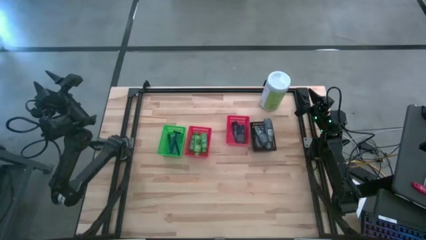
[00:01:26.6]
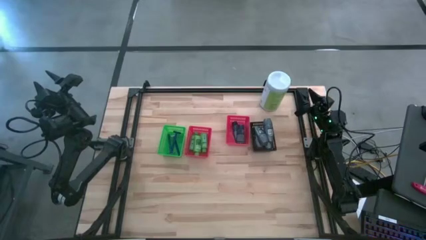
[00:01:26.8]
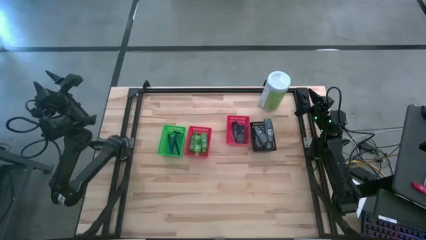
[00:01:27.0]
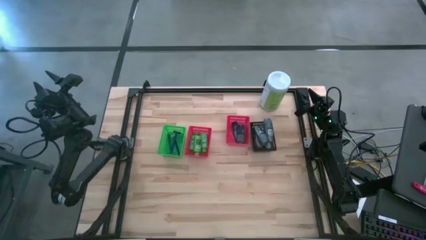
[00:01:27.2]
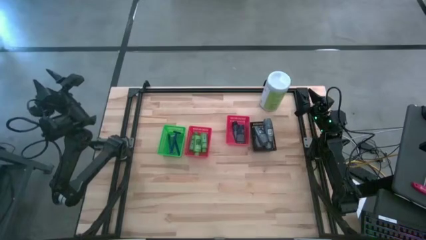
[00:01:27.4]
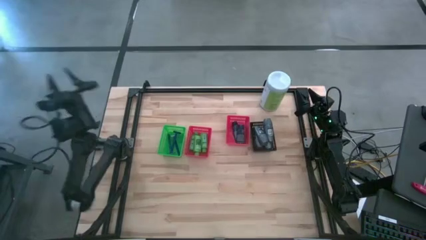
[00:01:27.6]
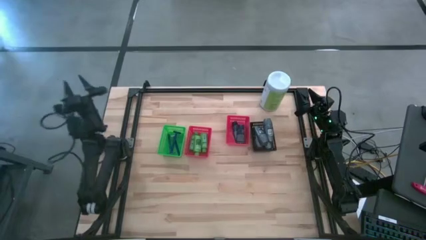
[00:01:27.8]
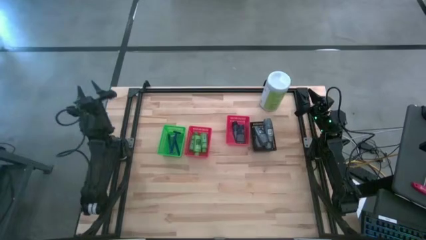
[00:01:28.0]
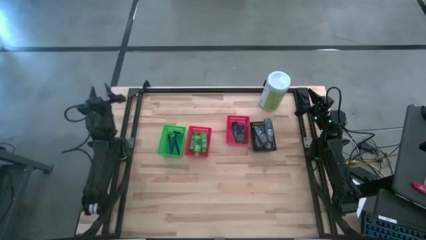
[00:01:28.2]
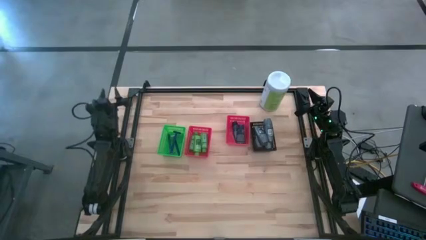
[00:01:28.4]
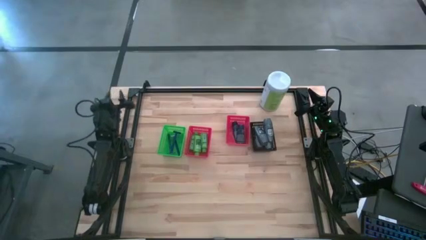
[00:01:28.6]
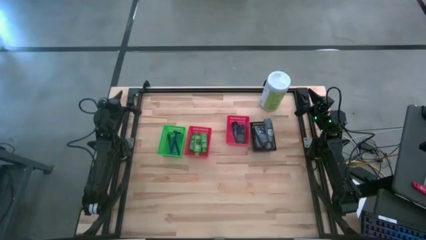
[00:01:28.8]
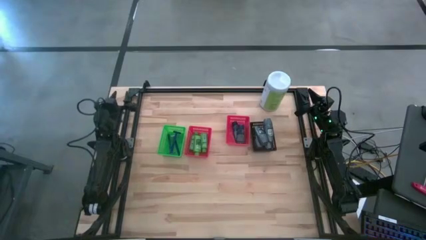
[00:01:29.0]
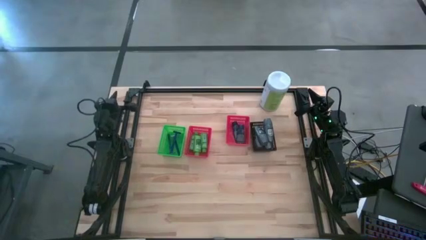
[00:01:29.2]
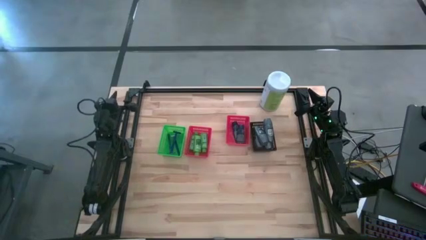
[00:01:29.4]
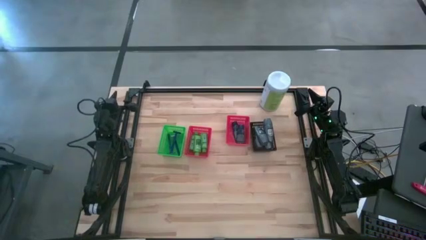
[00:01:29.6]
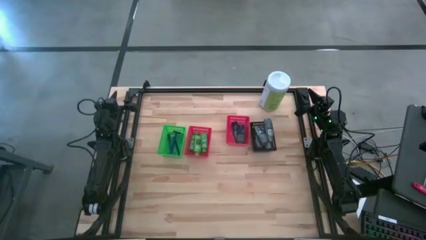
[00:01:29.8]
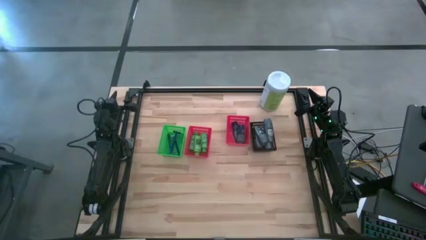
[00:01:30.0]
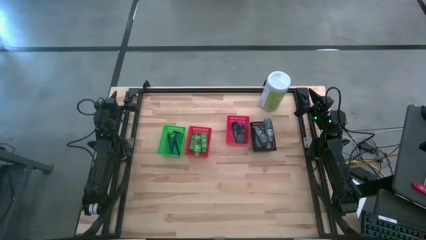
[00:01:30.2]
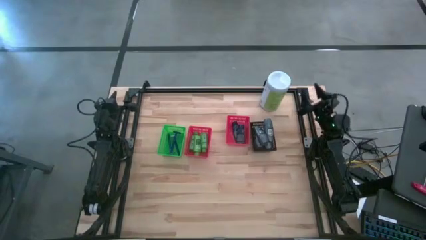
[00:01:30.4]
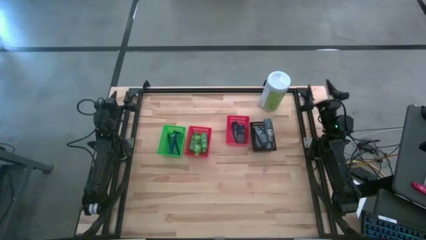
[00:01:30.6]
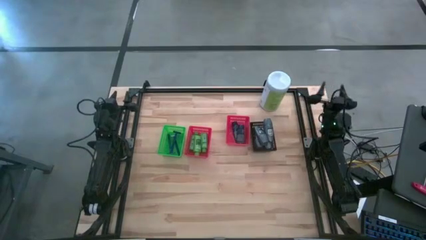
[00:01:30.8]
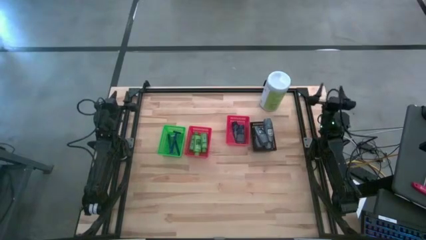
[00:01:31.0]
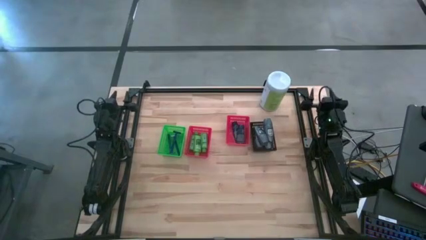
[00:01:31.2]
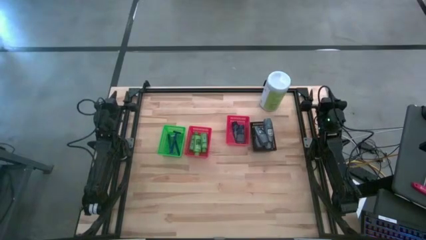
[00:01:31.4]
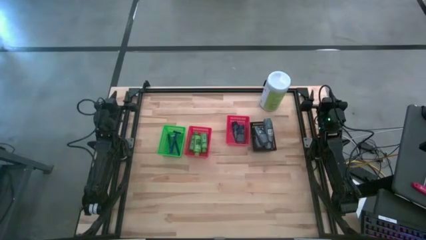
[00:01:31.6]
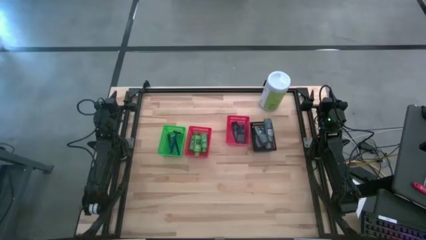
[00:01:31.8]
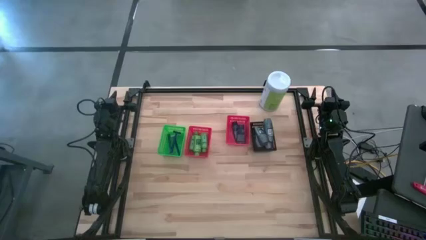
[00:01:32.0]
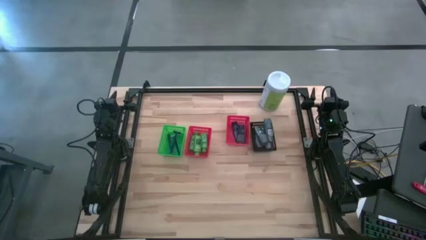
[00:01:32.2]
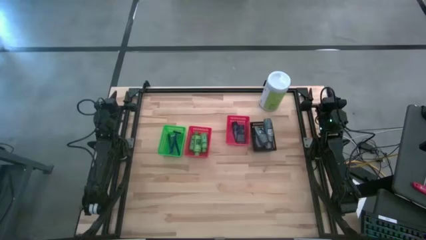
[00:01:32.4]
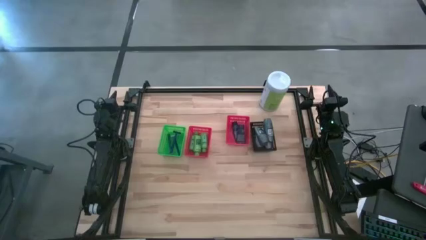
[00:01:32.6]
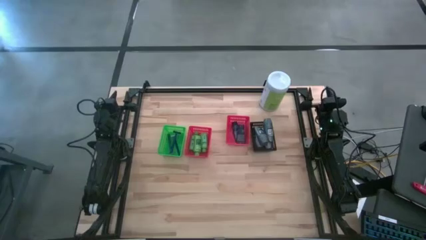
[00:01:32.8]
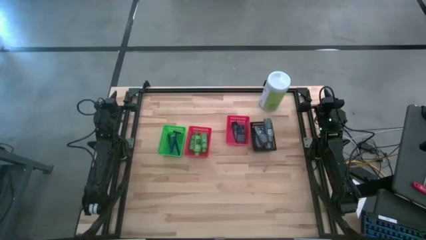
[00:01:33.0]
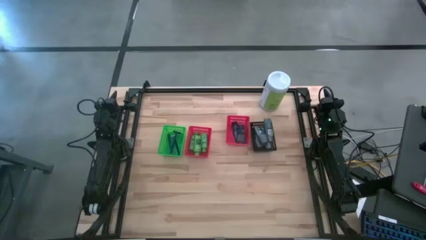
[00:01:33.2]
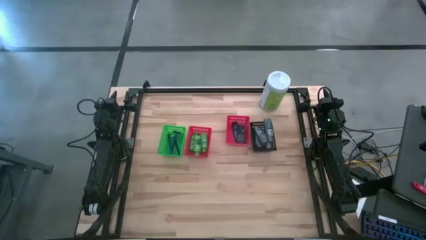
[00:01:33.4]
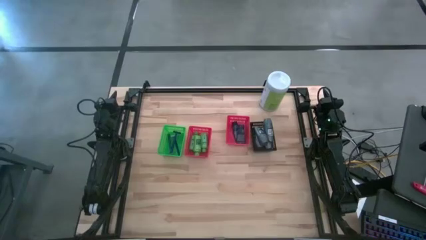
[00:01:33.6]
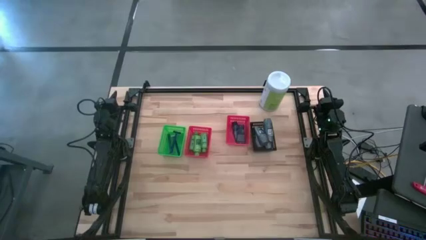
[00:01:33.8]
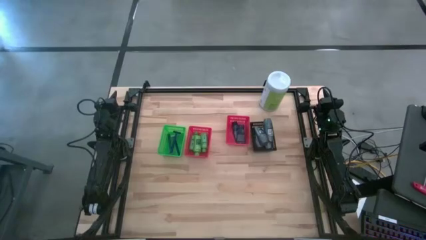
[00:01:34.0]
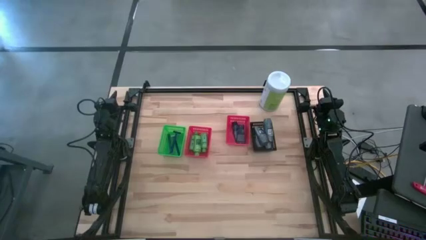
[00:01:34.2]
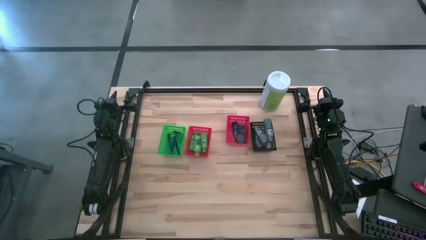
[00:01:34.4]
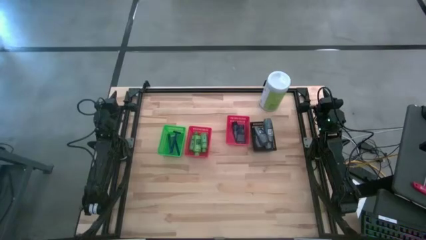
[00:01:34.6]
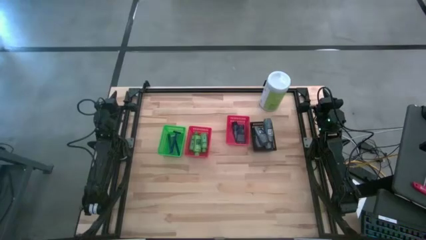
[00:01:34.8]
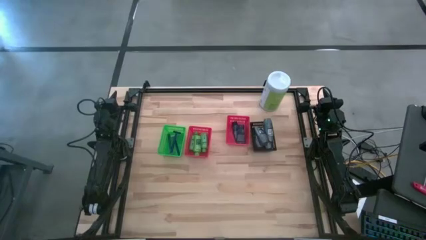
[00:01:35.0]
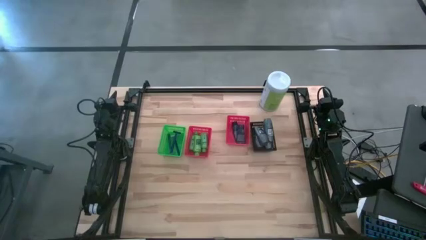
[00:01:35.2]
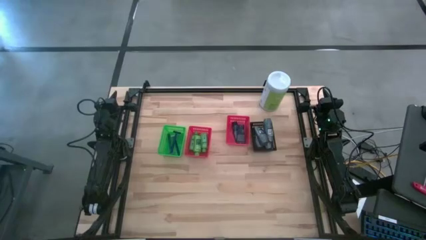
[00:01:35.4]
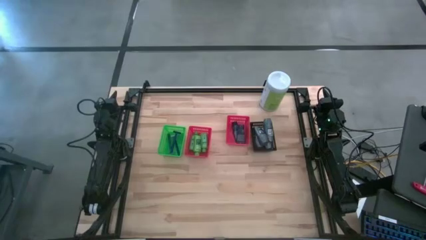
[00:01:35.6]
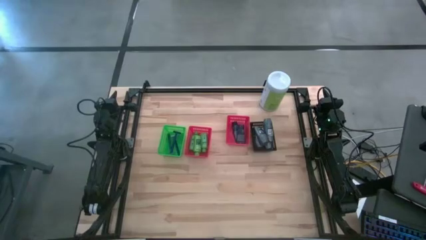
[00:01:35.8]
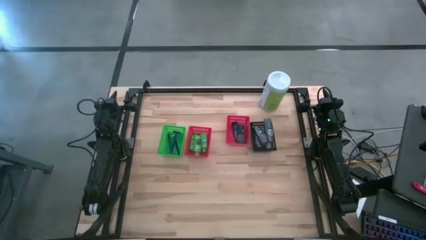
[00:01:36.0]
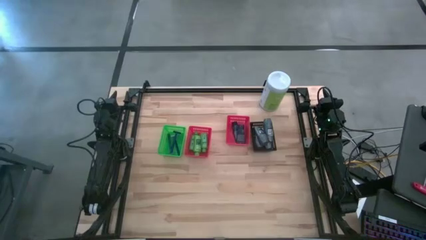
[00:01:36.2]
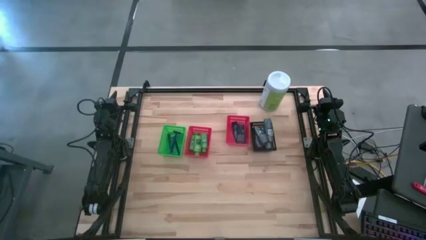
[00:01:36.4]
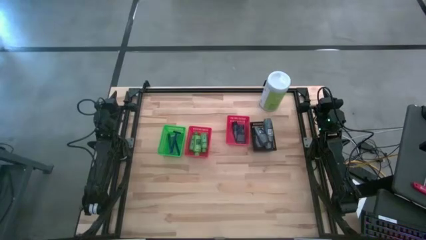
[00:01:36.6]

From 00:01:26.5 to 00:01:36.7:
Task: Pick & Place Travel size toiletries
Return to Home Position

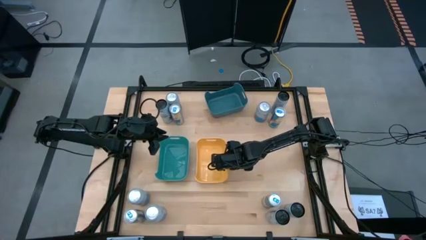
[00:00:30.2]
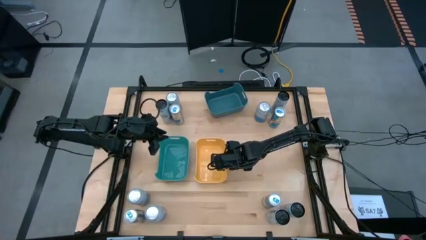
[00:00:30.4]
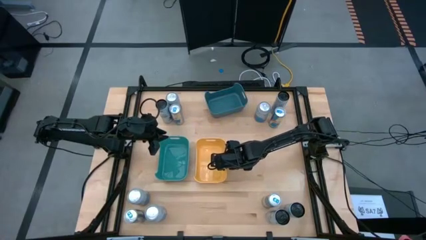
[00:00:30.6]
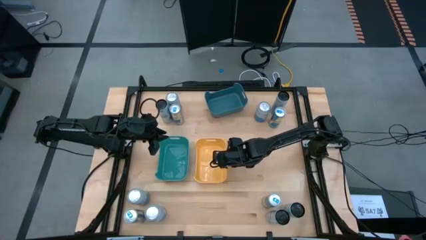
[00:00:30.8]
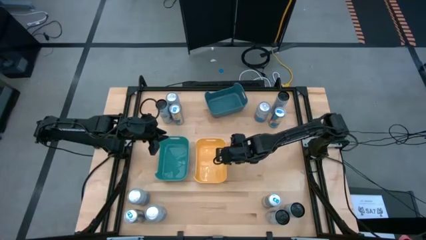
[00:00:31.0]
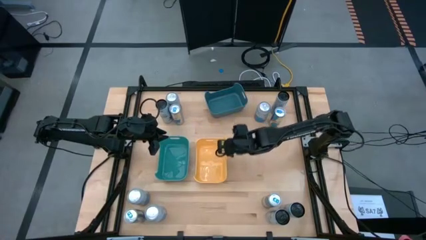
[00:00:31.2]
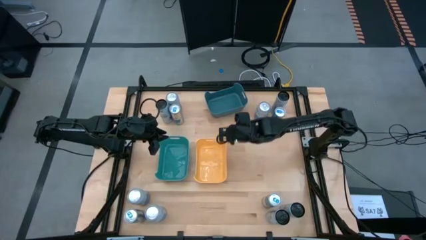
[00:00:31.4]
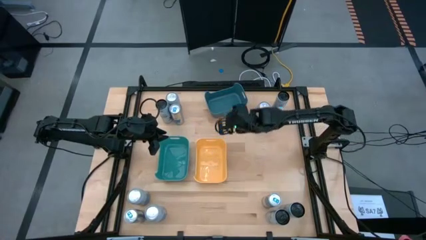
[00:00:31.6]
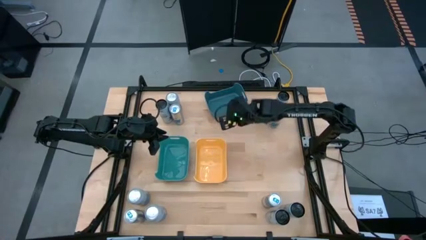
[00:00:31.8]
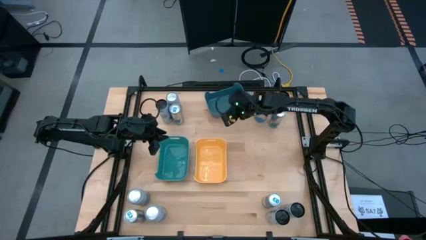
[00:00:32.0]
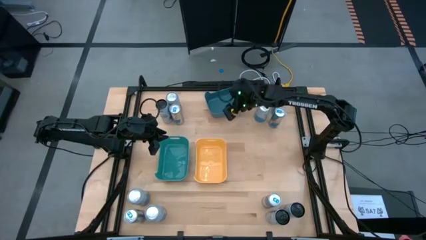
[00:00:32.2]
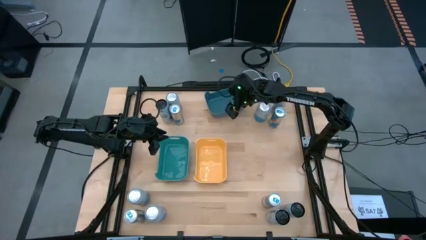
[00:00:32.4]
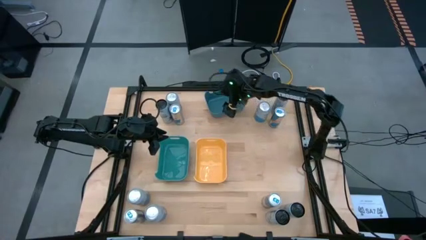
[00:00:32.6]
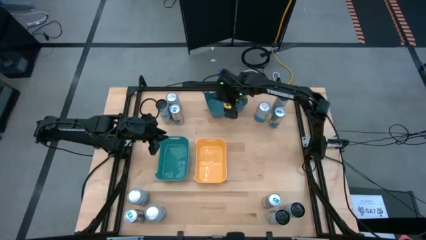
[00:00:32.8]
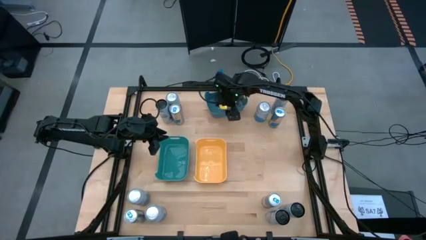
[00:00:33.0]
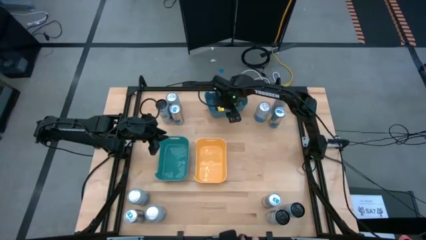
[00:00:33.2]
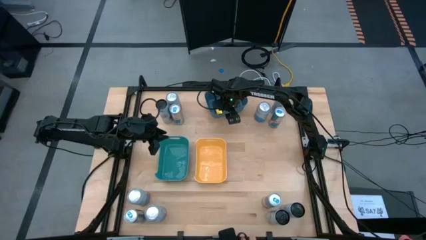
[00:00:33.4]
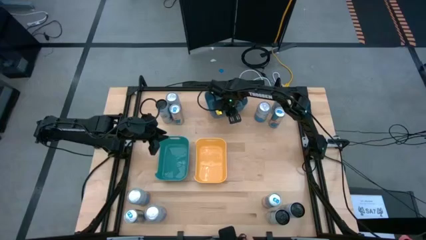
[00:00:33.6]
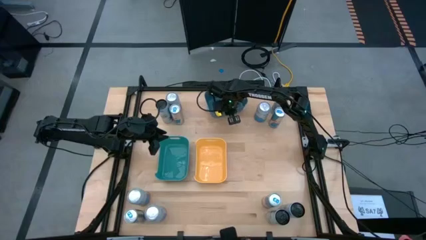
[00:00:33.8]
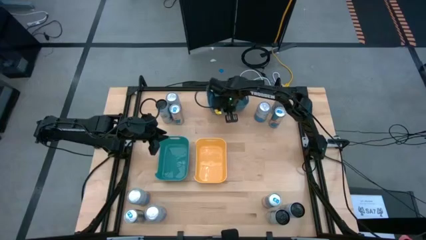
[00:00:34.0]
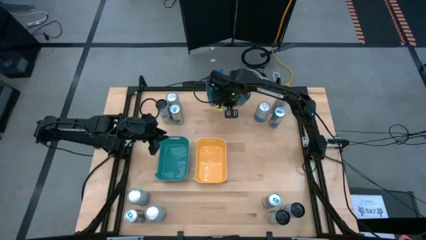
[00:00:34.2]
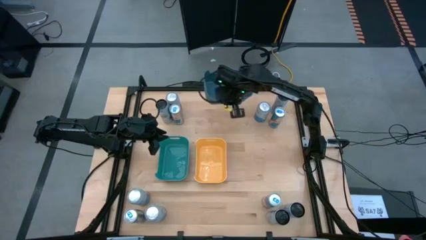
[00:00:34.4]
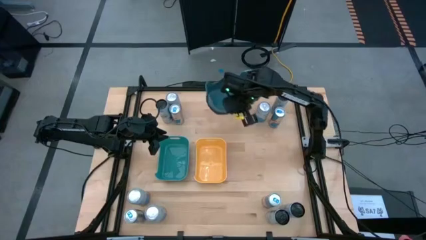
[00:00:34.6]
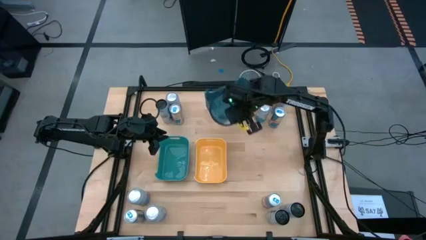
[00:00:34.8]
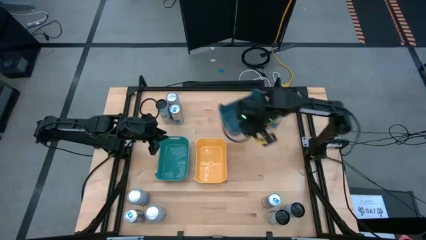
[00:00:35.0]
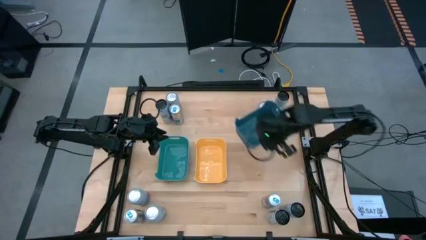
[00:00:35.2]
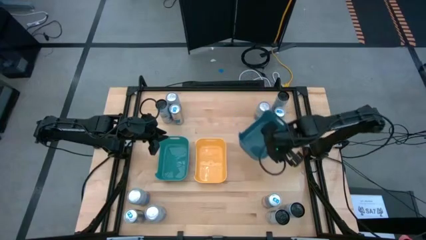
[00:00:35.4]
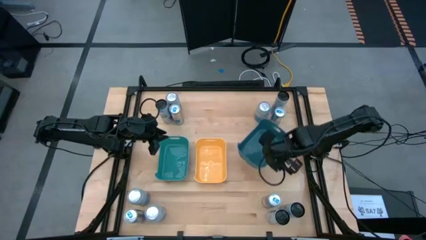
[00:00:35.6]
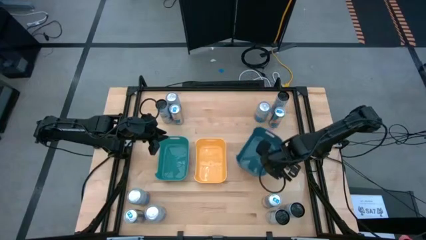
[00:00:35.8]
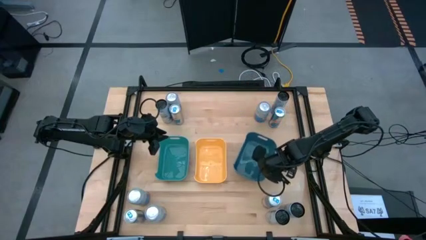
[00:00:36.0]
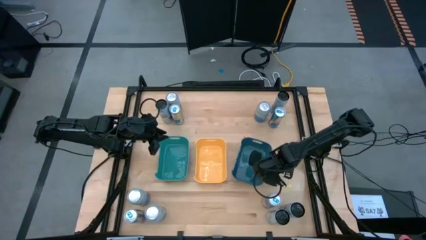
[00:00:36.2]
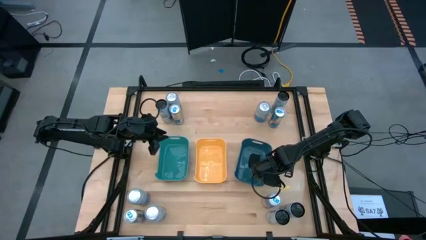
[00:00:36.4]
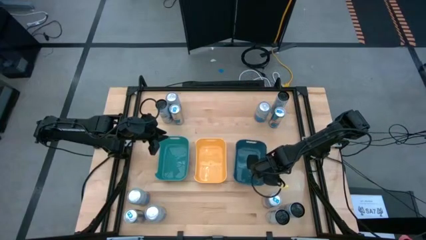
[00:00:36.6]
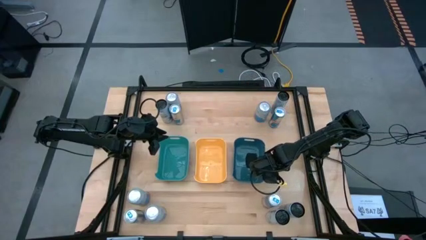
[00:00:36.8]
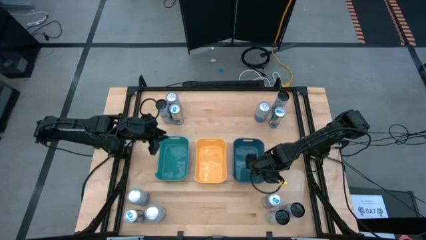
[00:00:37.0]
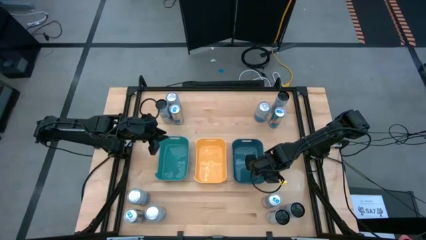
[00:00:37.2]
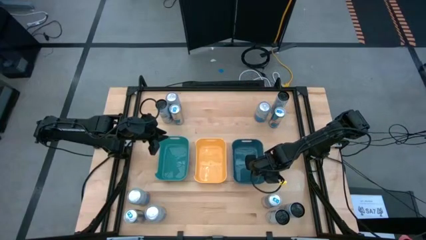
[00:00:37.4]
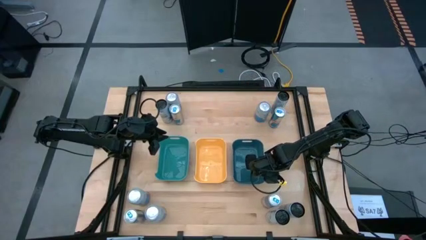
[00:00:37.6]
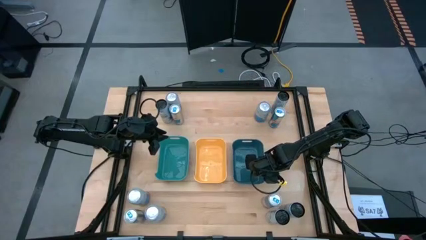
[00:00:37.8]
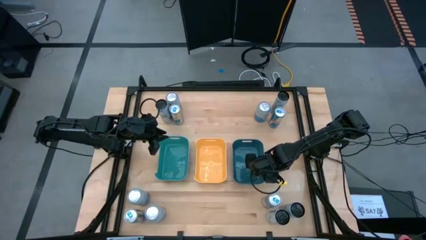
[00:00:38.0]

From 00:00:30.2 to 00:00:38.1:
Task: Sort soda cans
Move the dark green bin beside the yellow bin
